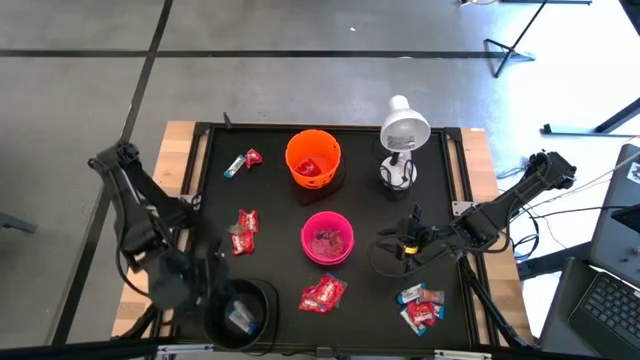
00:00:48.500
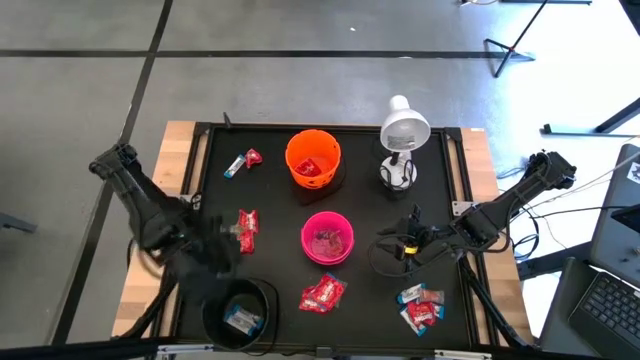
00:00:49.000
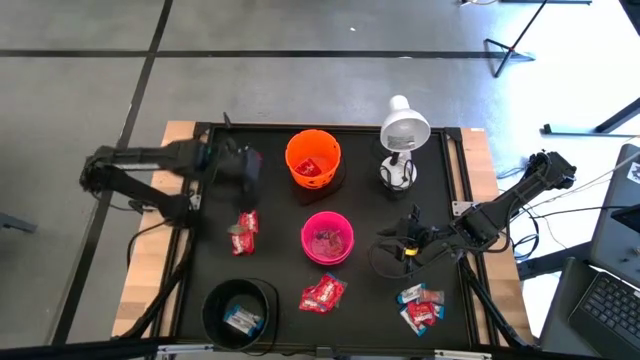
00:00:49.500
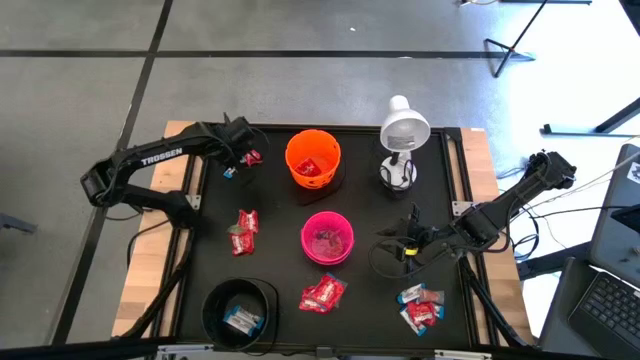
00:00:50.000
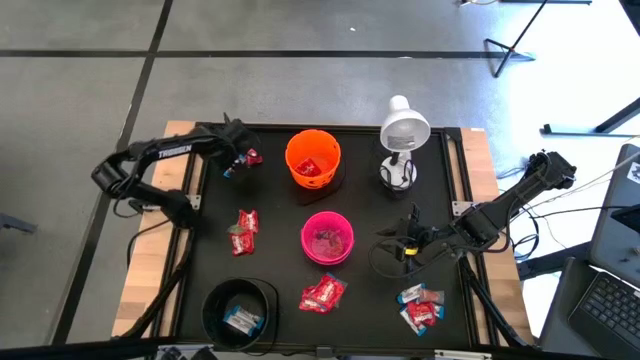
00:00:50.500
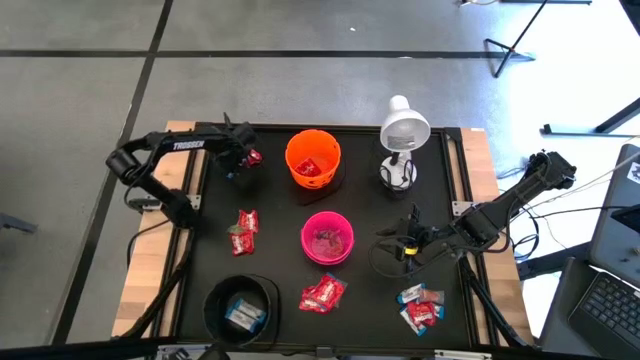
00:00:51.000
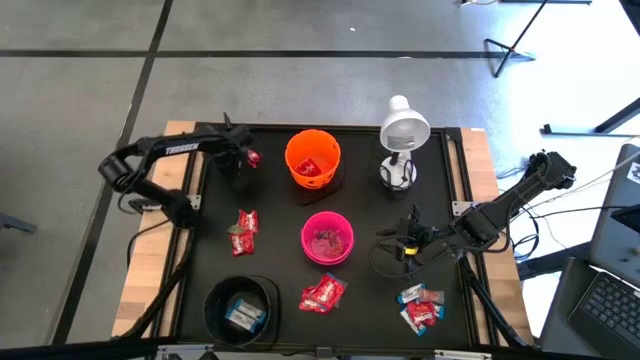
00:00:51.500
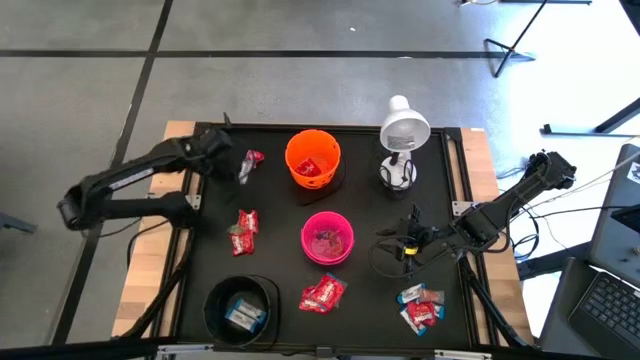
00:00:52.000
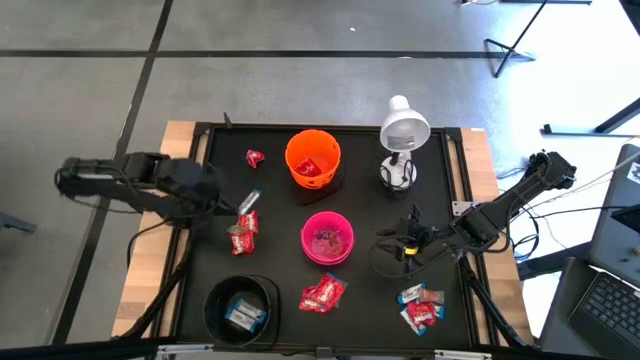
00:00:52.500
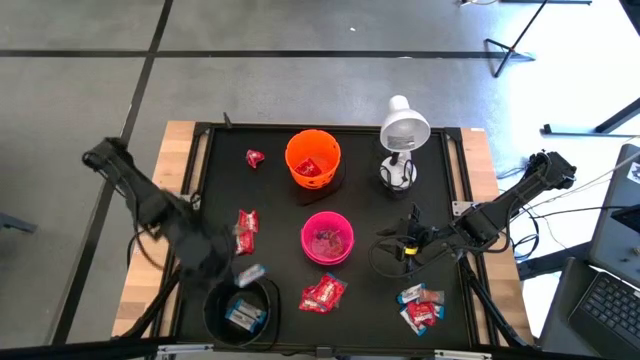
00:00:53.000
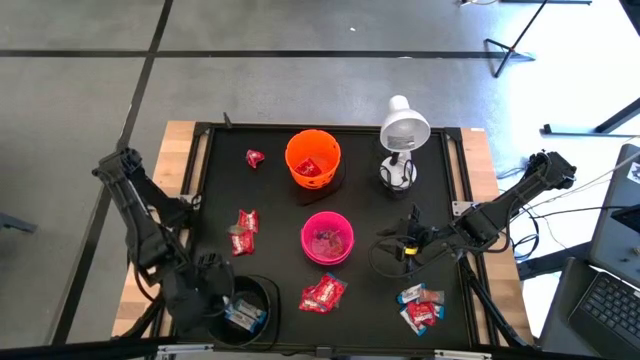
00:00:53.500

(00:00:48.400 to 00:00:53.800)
Task: Sort candy
Put the white chocolate into the black bucket

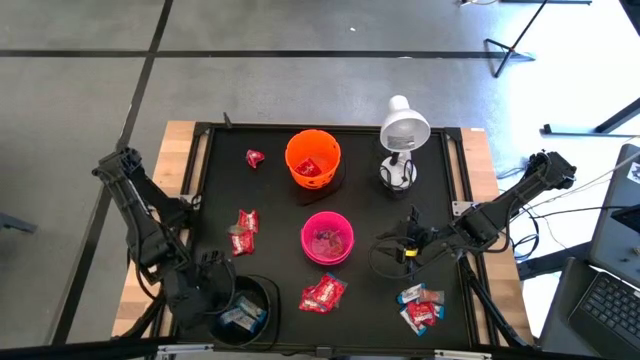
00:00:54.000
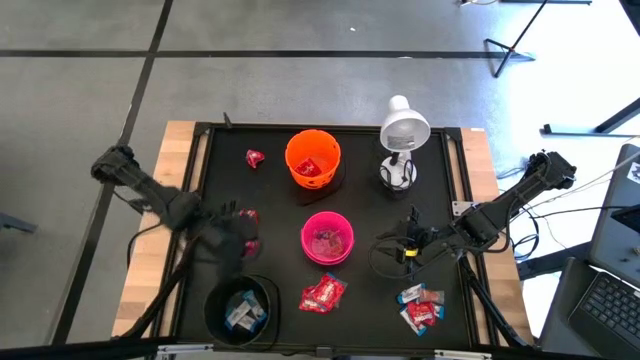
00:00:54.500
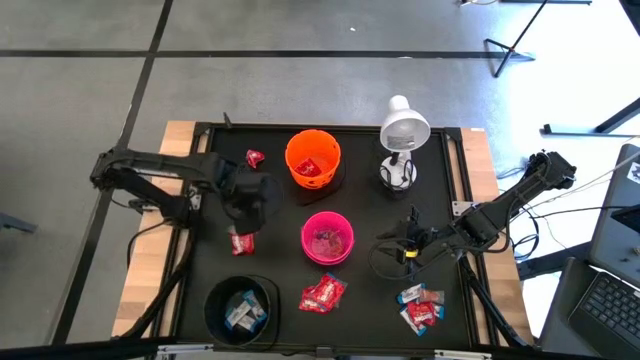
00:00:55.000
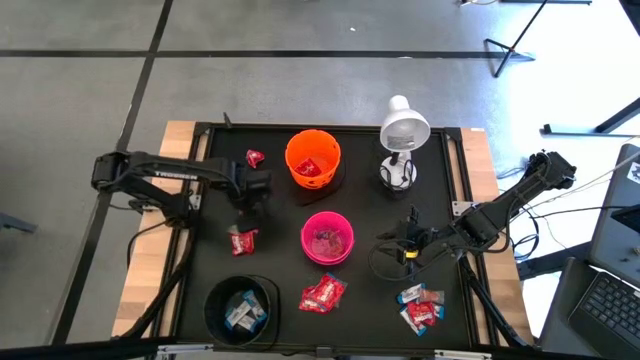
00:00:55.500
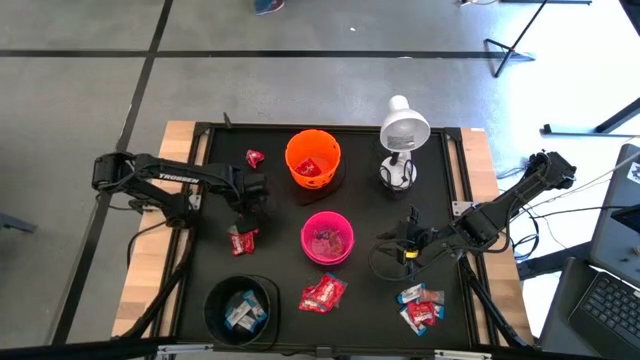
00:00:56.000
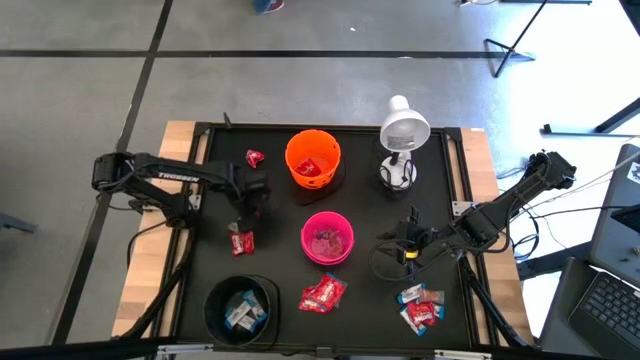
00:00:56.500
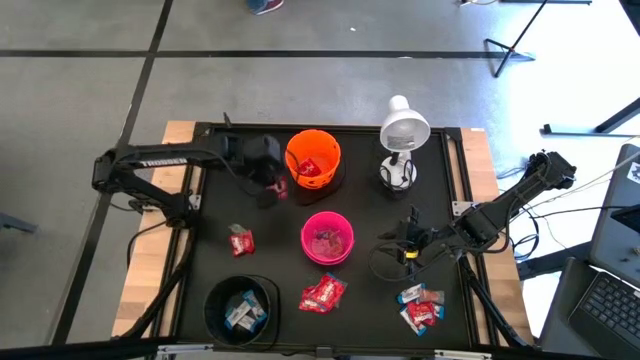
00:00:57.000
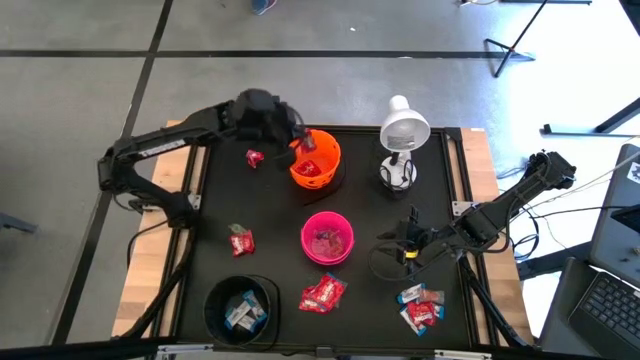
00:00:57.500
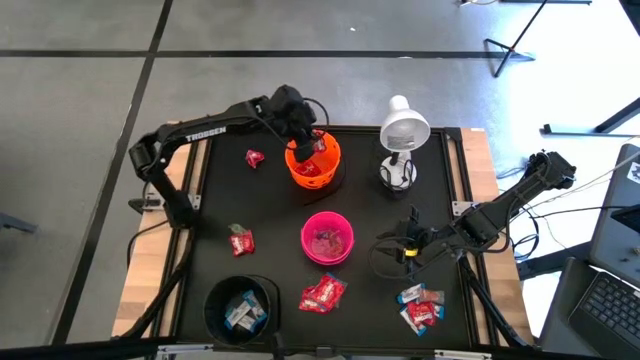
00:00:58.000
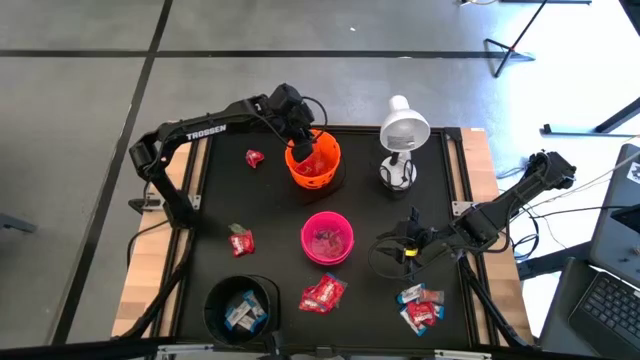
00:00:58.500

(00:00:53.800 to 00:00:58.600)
Put the red candy into the orange bucket

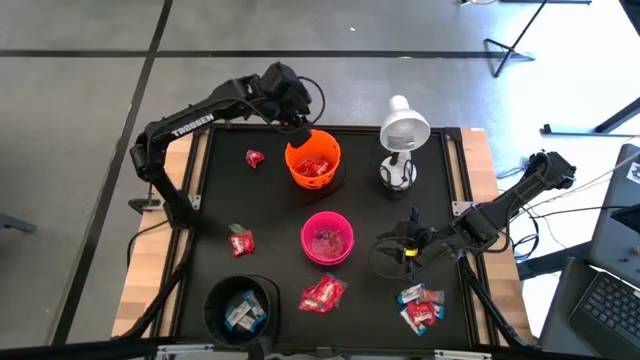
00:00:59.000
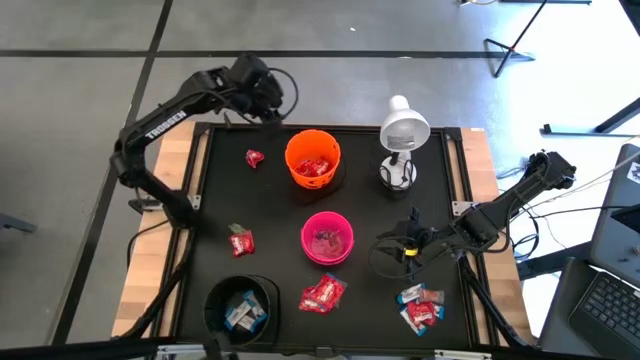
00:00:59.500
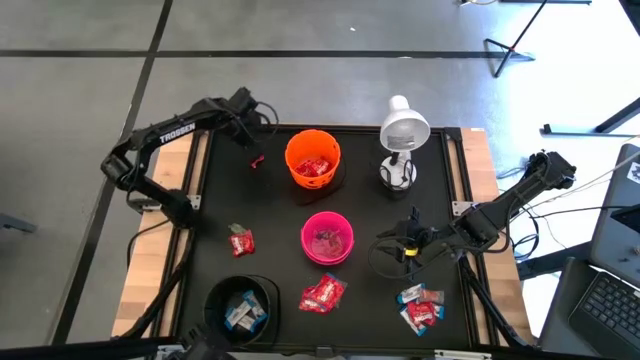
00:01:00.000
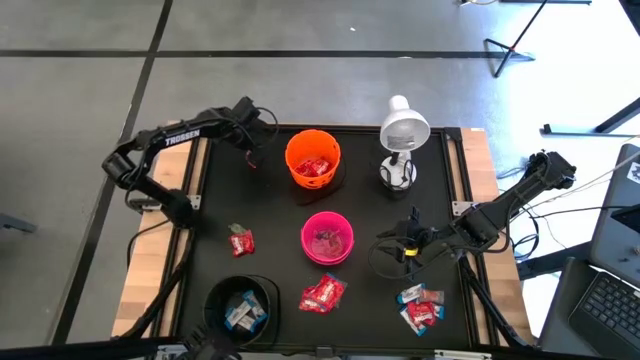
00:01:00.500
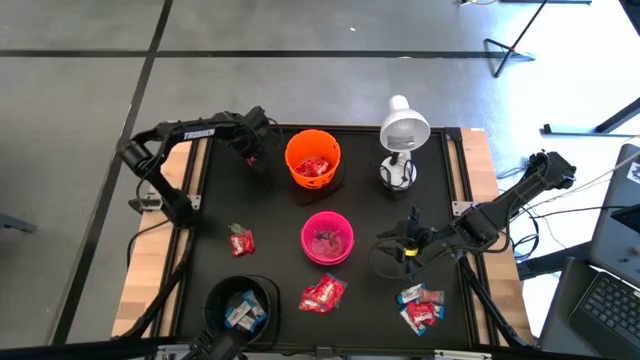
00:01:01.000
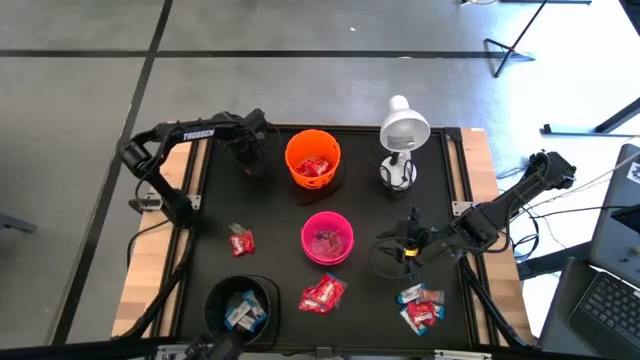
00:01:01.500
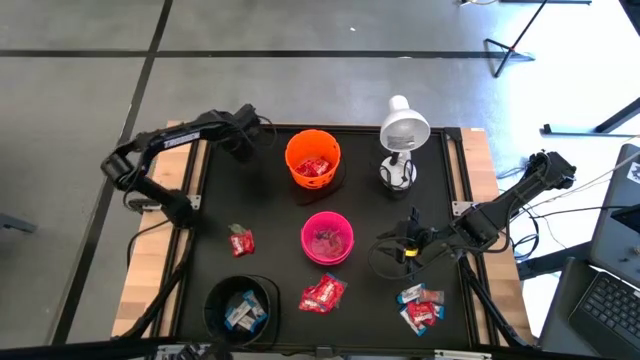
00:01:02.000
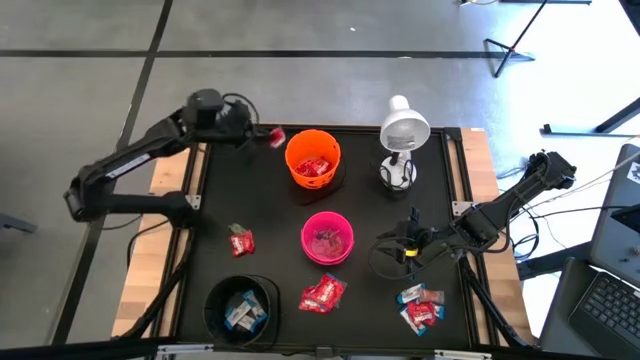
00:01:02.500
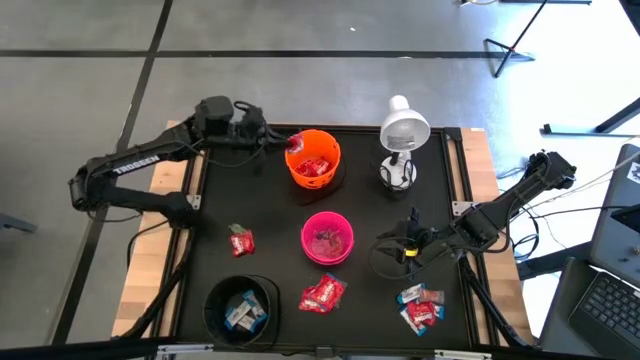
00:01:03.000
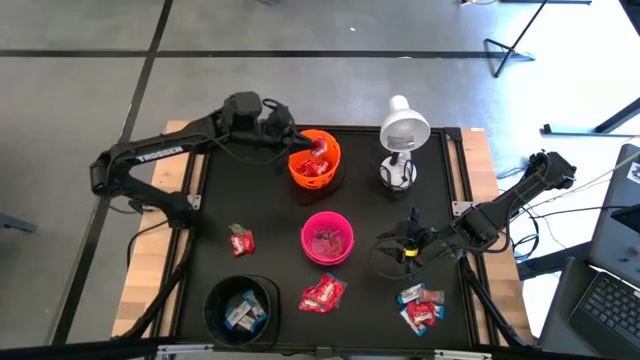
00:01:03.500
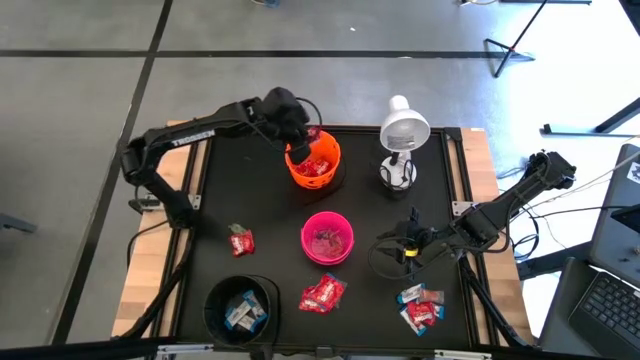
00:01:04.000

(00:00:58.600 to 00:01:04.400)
Put the red candy into the orange bucket

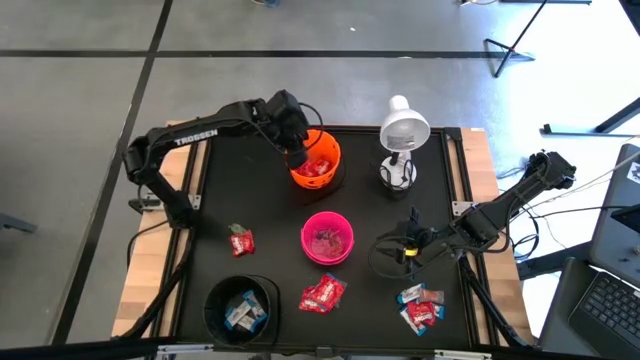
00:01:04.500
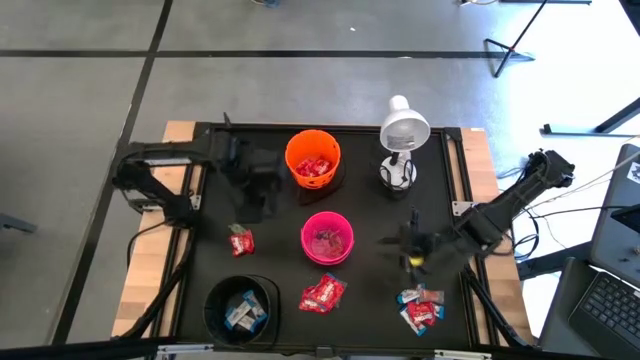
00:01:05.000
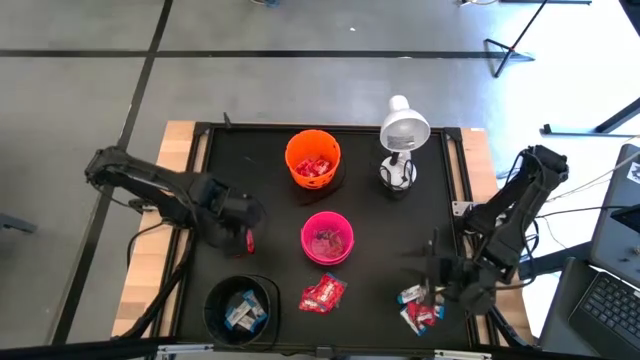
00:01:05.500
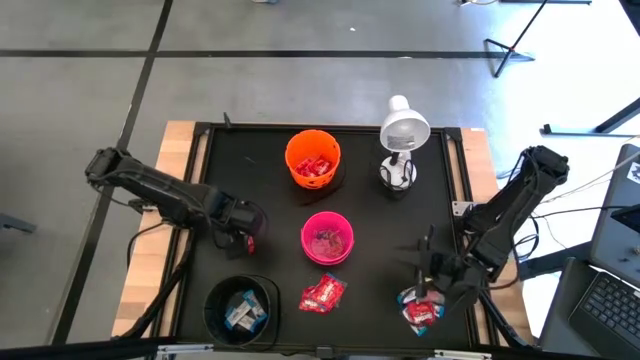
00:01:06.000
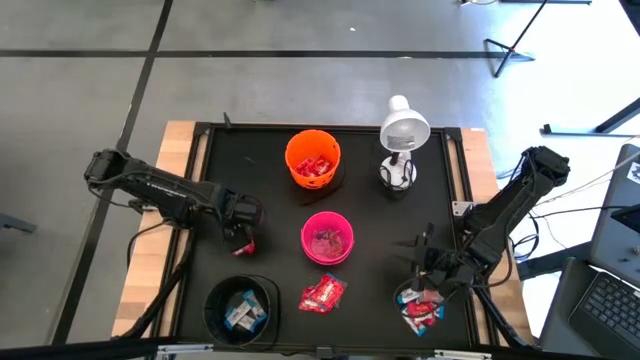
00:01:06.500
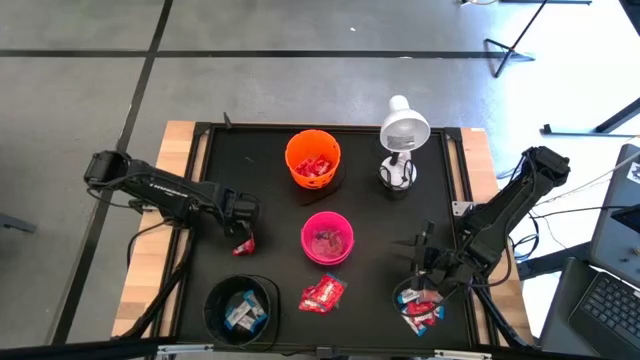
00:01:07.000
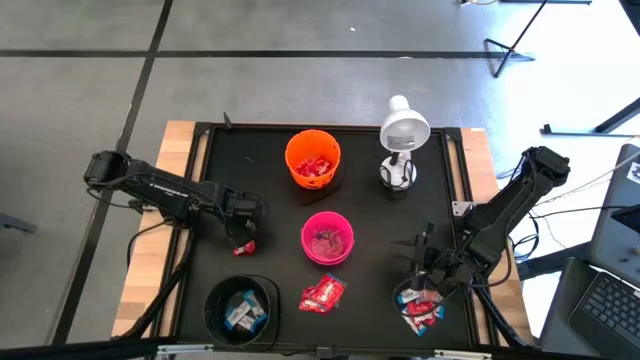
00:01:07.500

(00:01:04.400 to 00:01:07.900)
Put the green gummy into the pink bucket

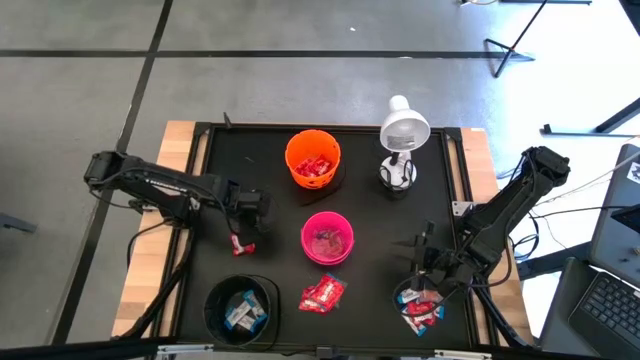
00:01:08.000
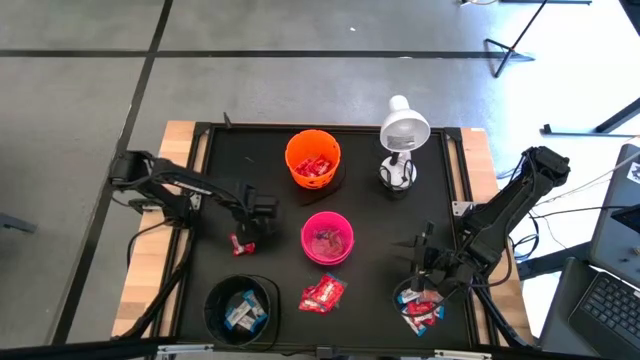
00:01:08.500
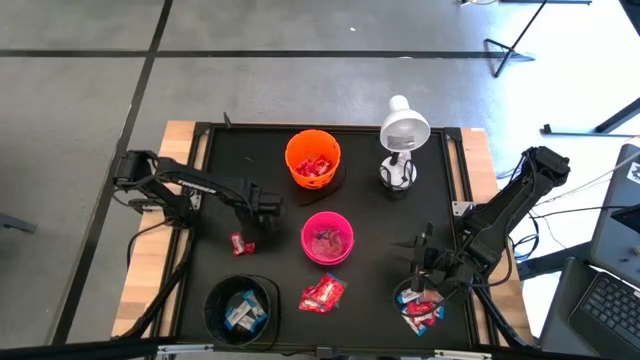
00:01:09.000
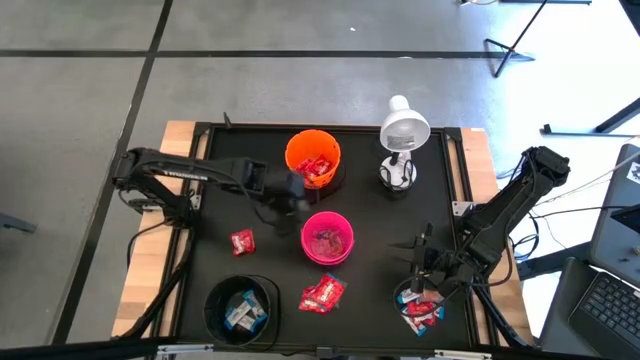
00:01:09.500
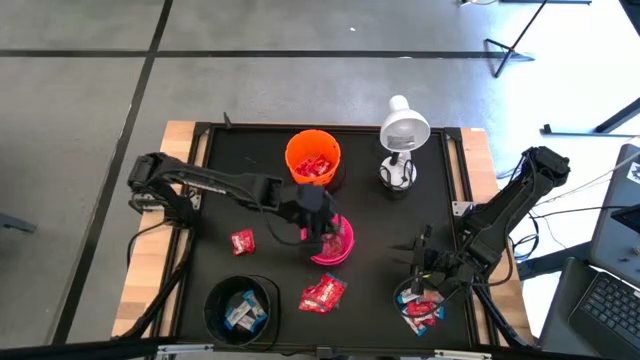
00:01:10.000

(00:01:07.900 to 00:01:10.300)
Put the green gummy into the pink bucket
